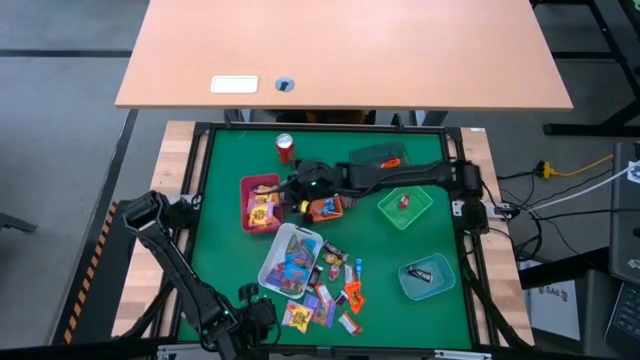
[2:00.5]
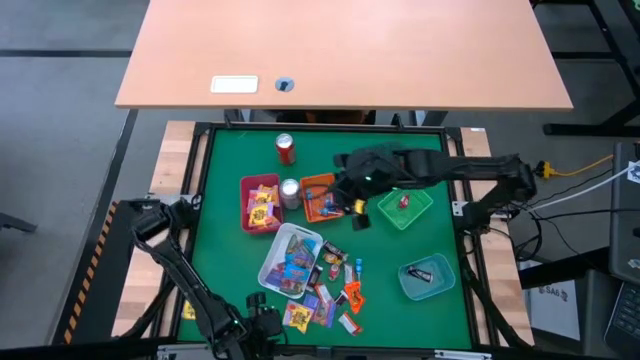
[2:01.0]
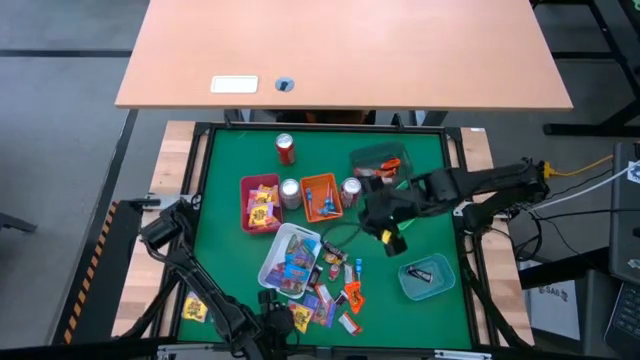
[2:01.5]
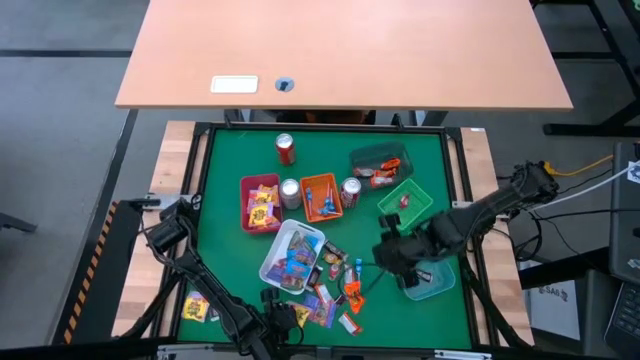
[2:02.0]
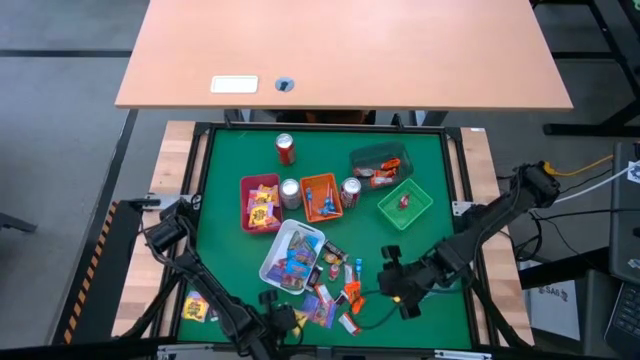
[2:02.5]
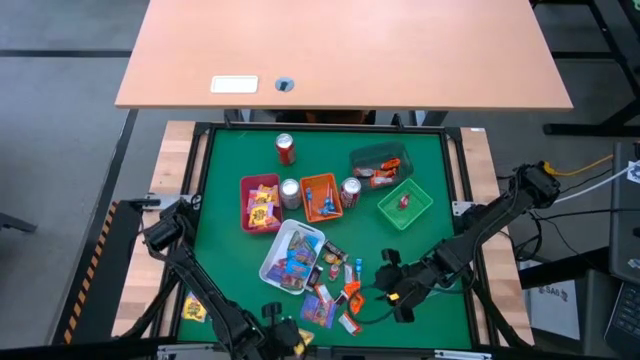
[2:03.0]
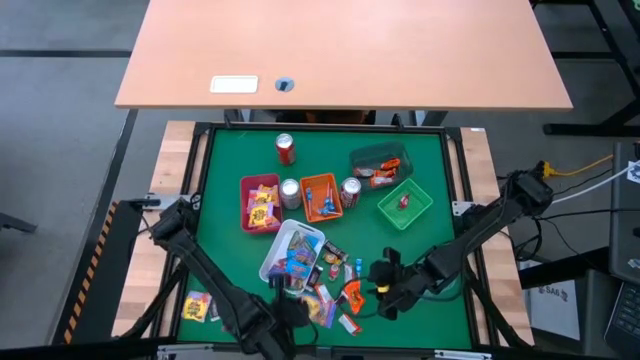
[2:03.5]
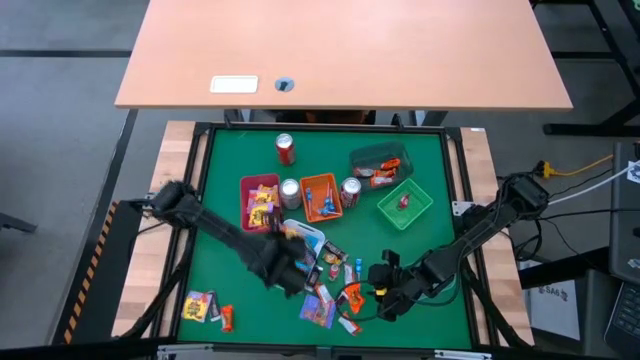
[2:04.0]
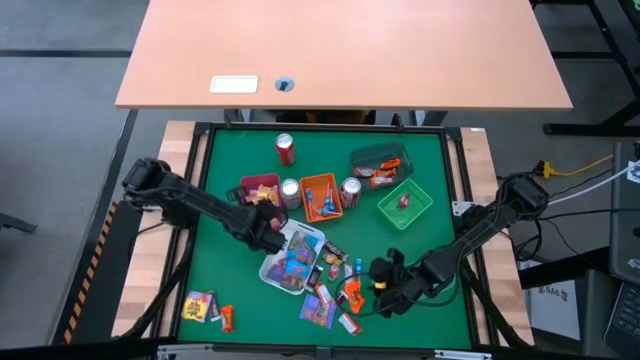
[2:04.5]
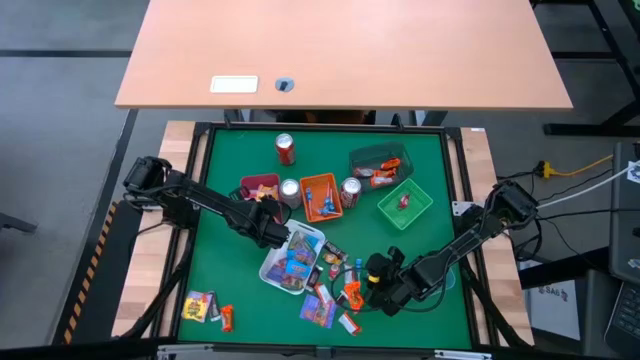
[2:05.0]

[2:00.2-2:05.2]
Task: Sort candy
Put the yellow candy pack into the red bin

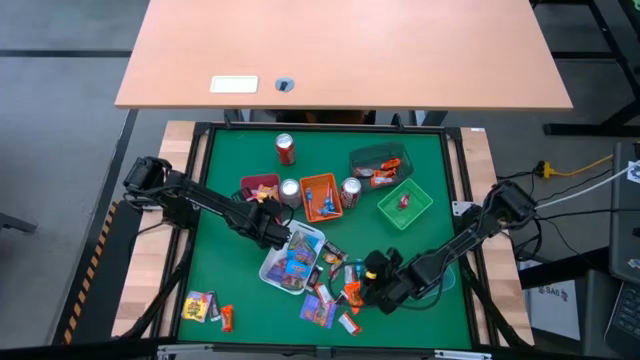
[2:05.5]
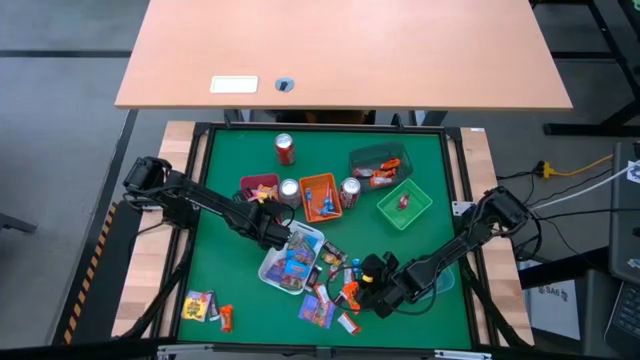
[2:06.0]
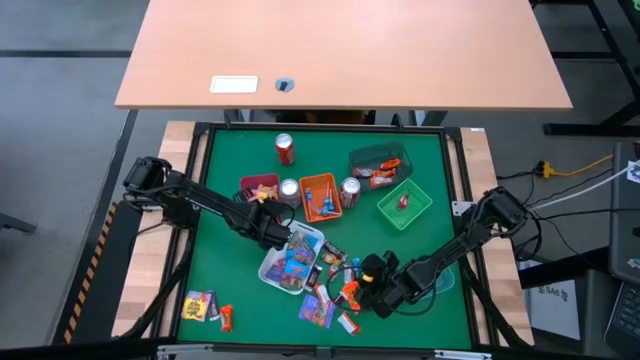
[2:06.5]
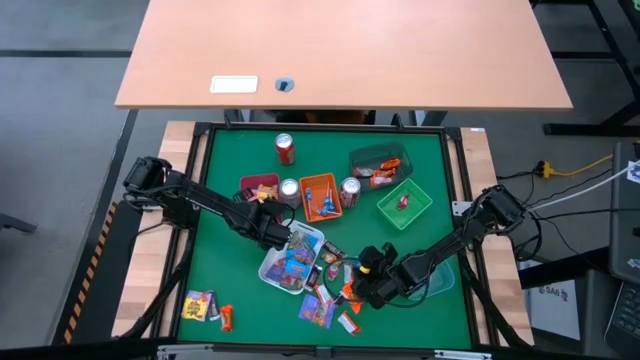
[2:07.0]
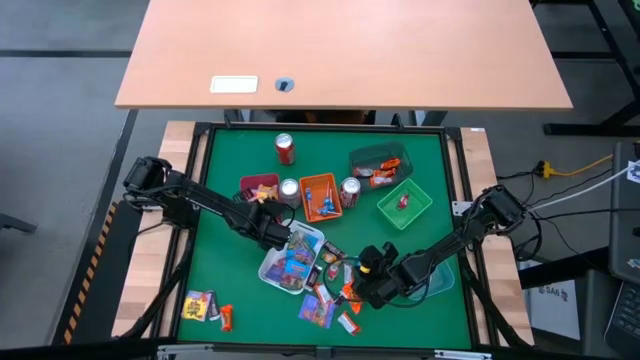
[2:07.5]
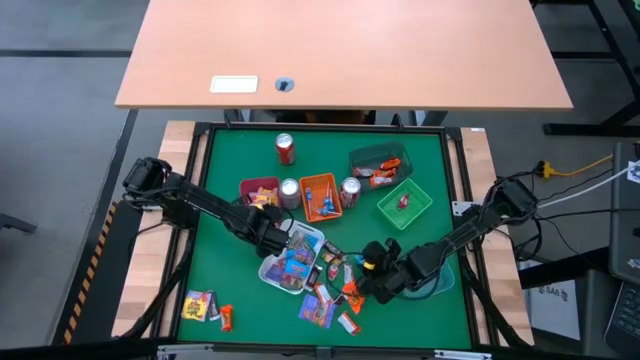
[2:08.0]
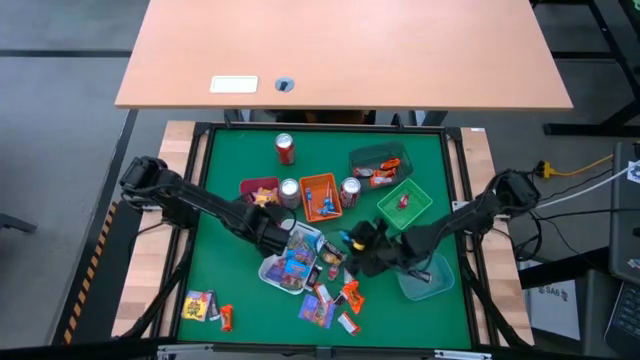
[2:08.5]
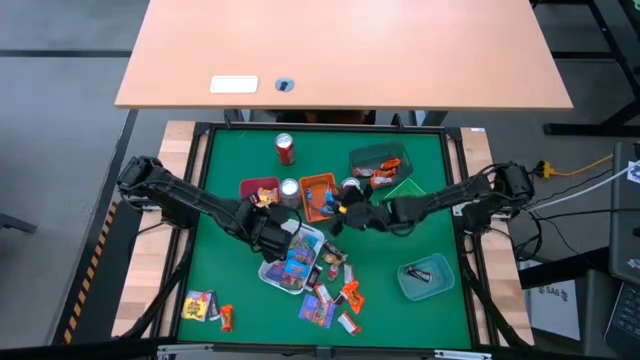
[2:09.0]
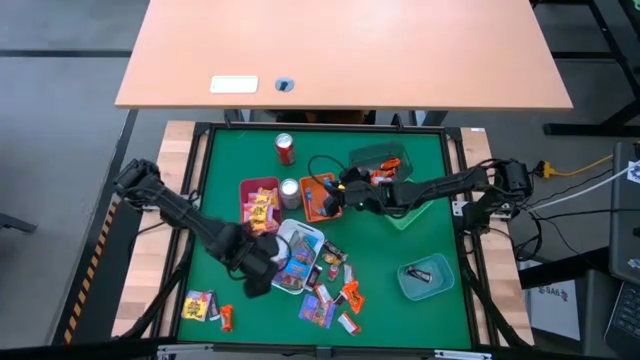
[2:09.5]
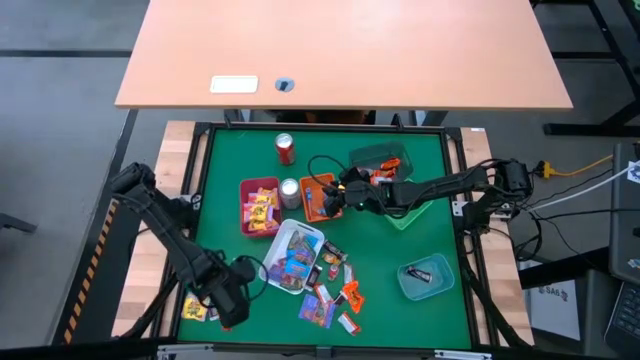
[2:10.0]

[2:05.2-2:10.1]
Put the blue lollipop into the orange bin

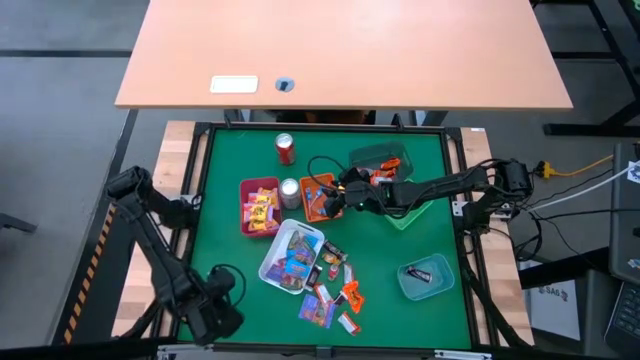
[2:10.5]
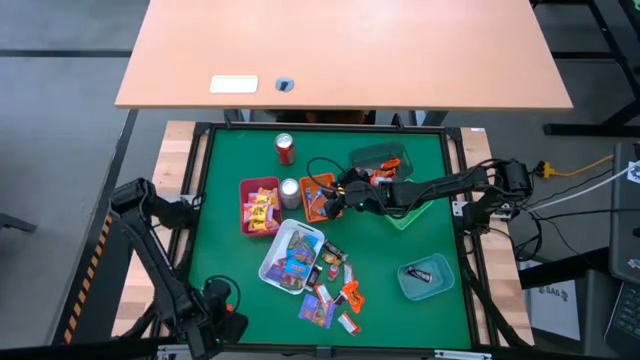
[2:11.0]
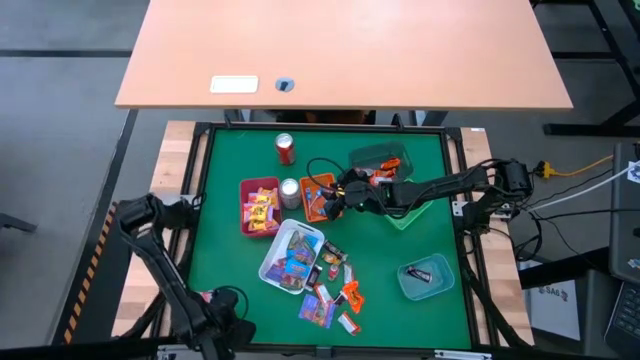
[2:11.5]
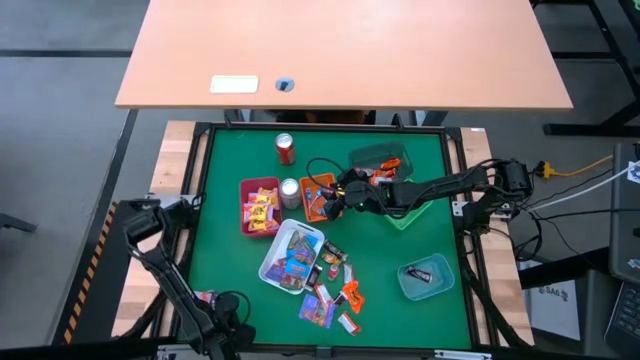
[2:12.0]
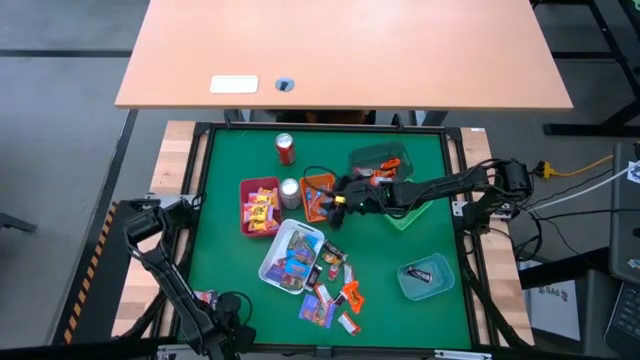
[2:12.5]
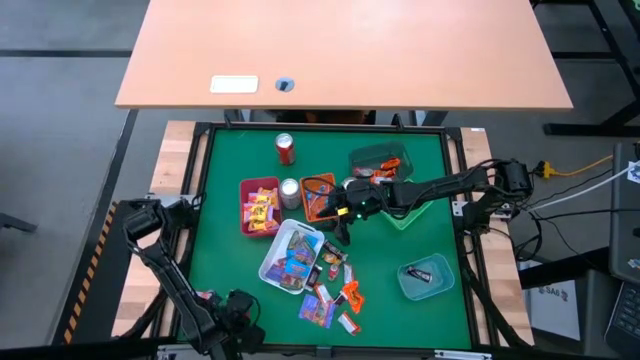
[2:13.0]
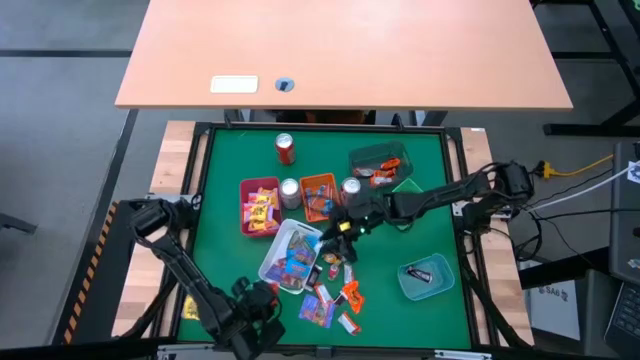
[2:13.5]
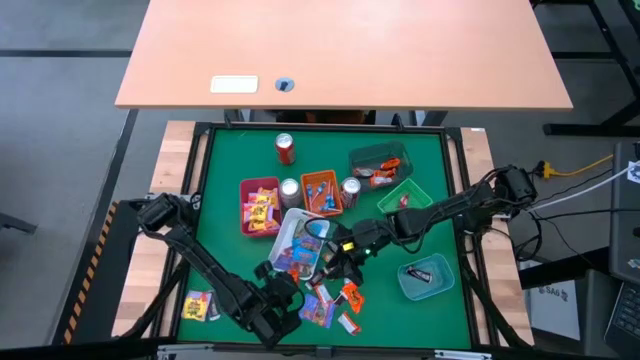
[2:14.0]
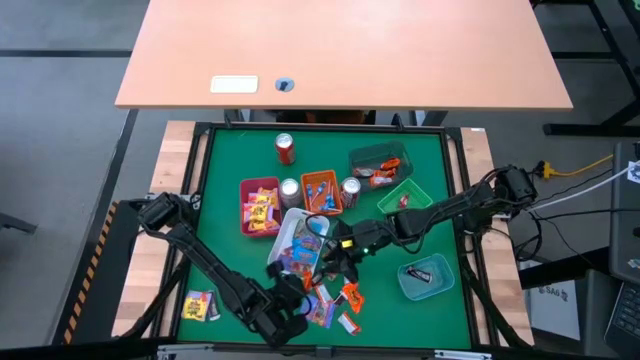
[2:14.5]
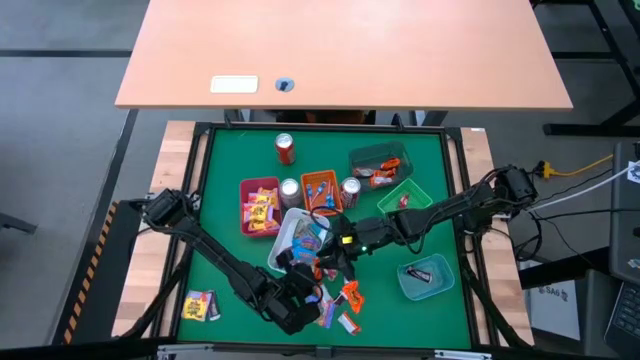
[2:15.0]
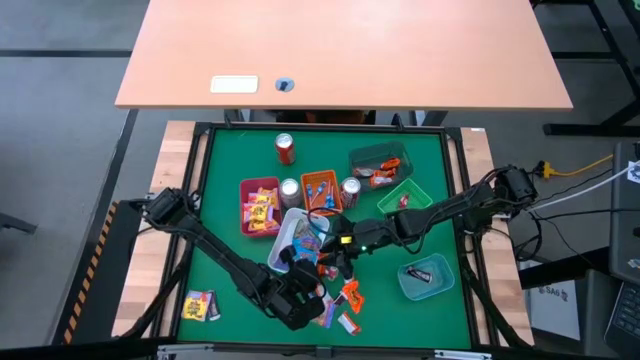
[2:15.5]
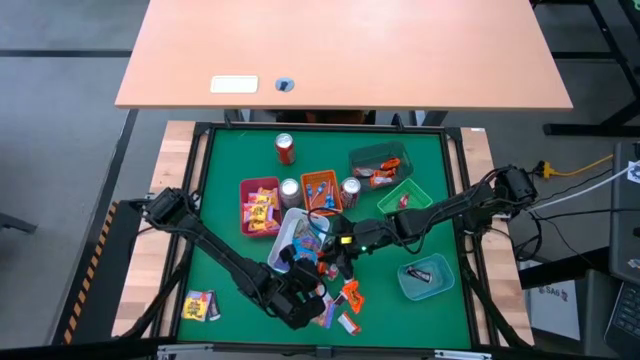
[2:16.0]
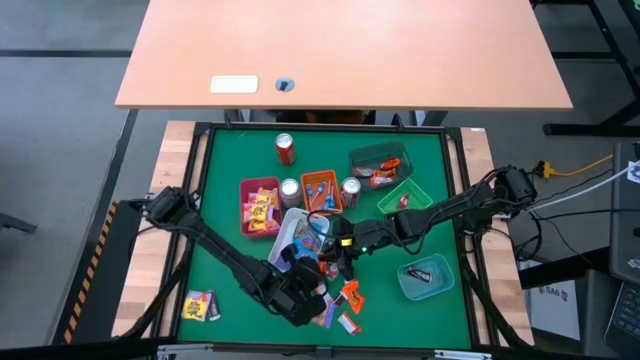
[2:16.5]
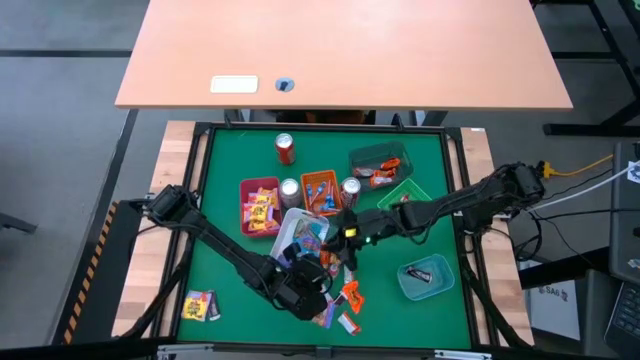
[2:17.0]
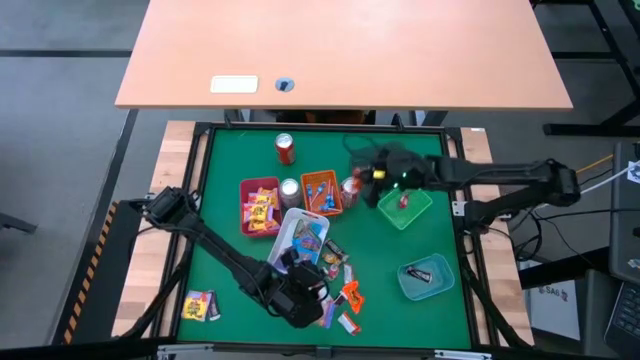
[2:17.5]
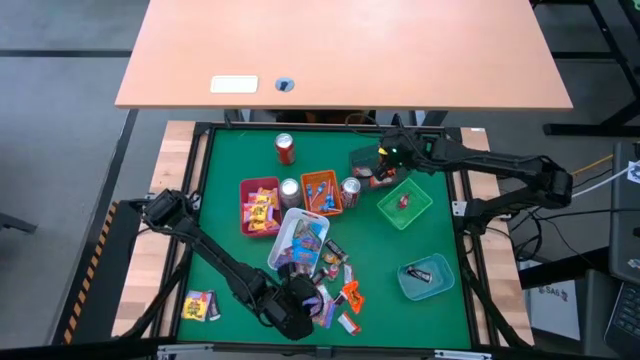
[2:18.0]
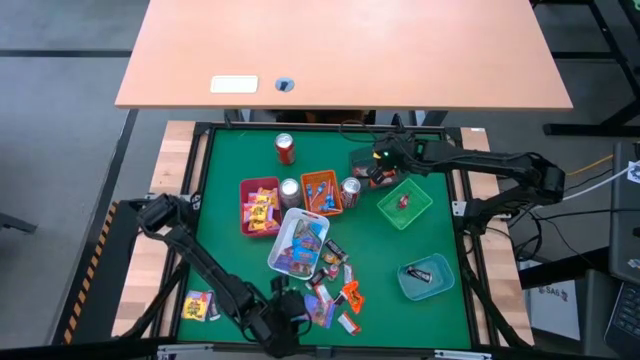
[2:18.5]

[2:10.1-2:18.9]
Put the orange candy into the black bin

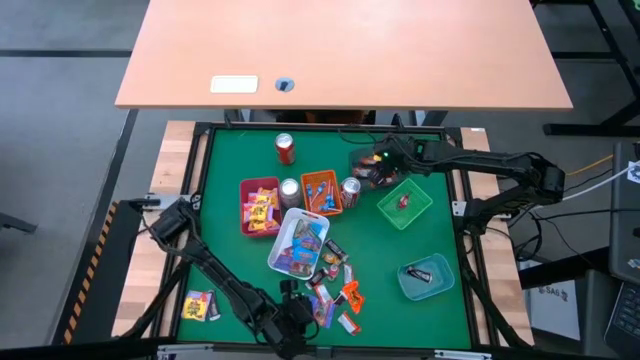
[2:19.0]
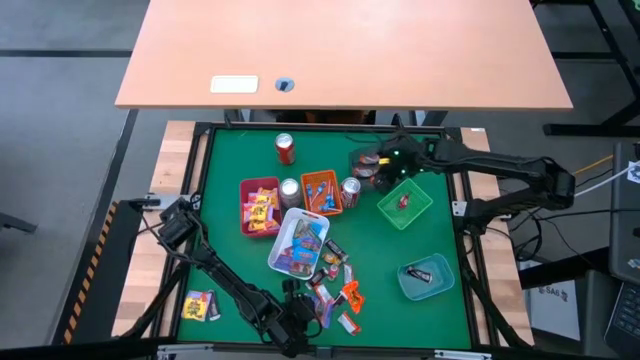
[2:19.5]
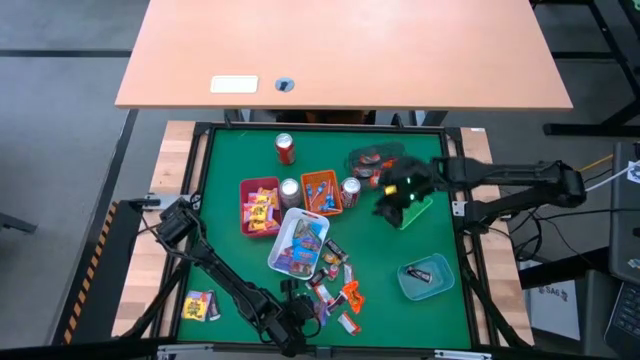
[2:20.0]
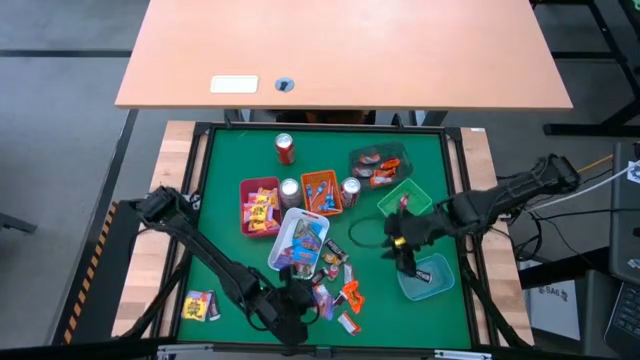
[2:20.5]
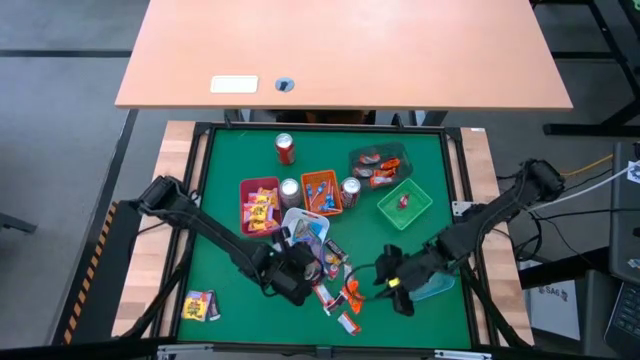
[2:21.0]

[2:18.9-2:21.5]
Put the purple gummy candy into the white bin
